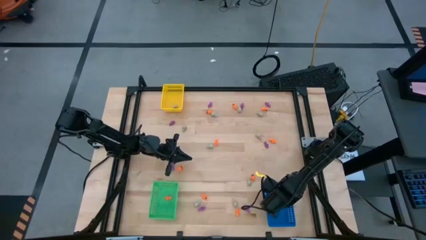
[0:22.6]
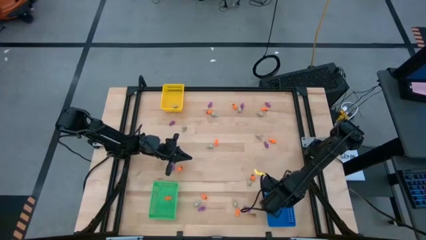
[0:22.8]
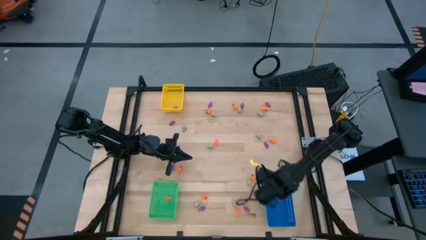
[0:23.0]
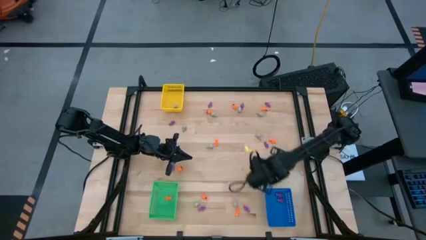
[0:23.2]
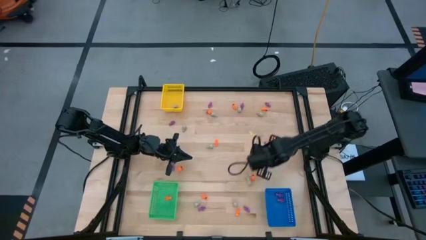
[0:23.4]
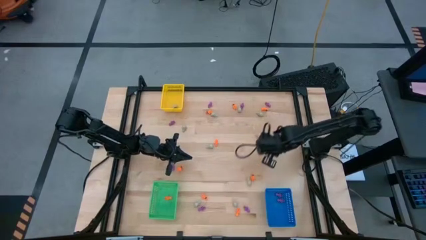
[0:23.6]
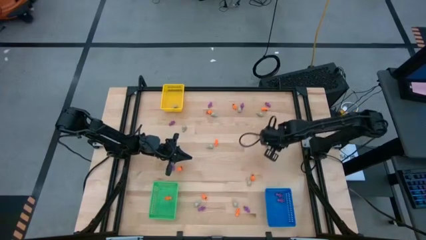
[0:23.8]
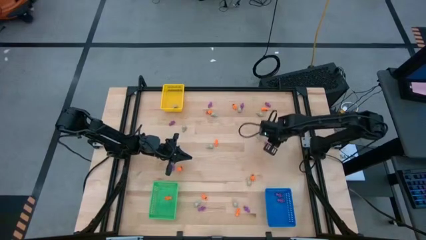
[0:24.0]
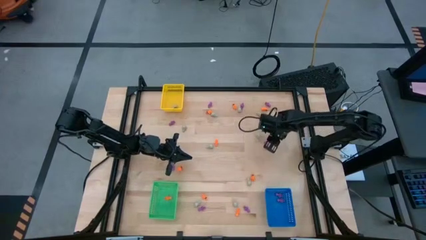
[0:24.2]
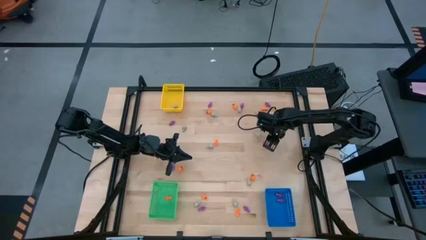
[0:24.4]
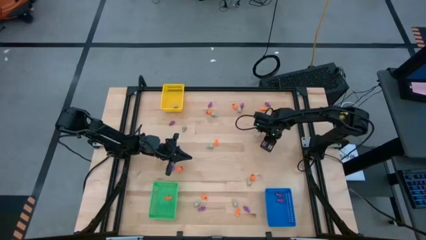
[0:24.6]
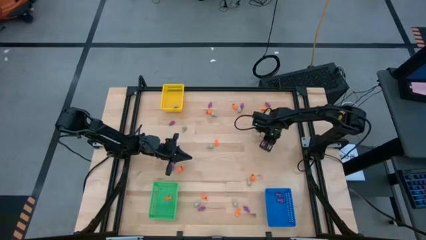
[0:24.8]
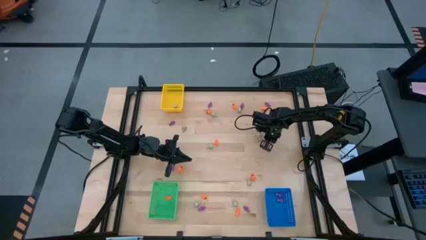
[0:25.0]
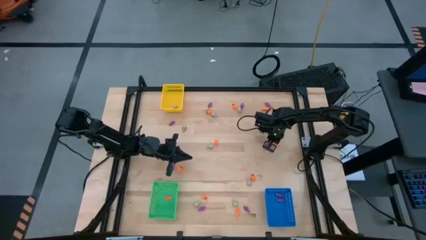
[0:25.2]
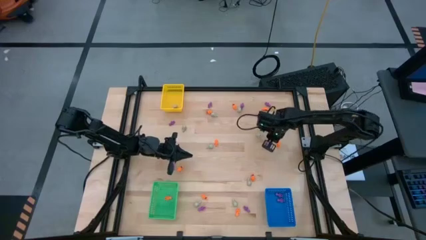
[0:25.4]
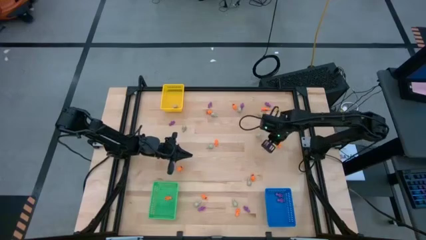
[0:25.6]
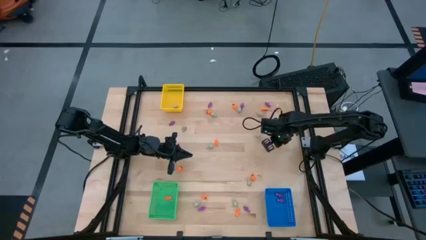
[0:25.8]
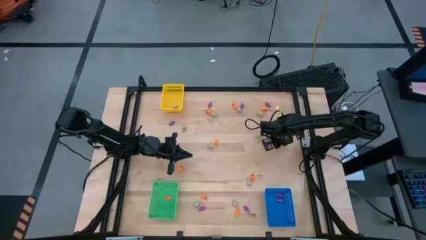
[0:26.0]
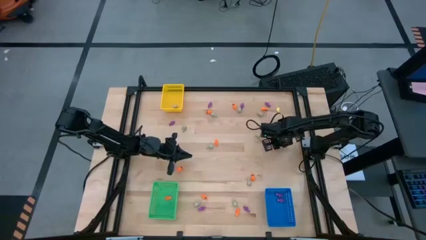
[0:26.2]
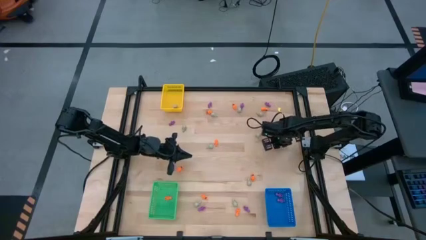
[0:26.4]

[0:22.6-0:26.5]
Task: Sort Halloween decoration
Put the orange skeleton toy into the green bin

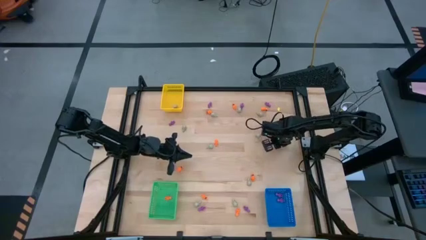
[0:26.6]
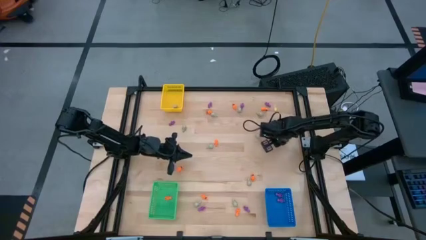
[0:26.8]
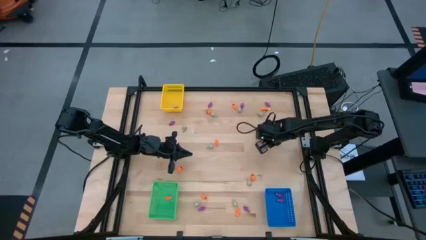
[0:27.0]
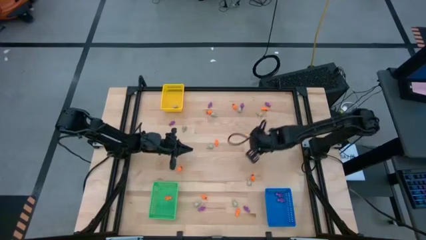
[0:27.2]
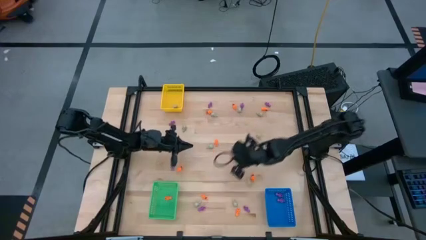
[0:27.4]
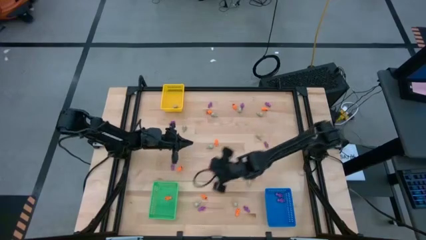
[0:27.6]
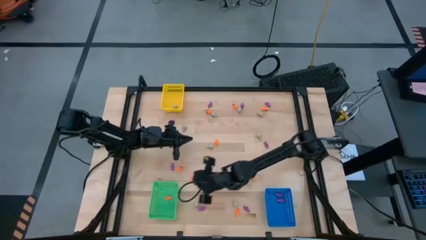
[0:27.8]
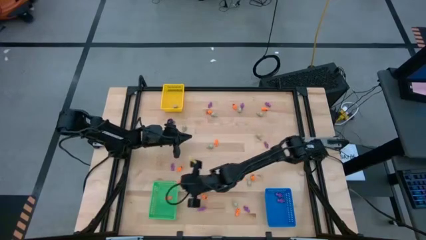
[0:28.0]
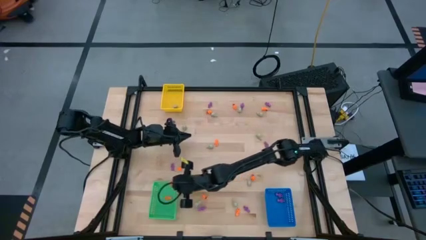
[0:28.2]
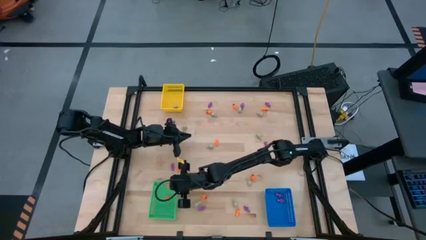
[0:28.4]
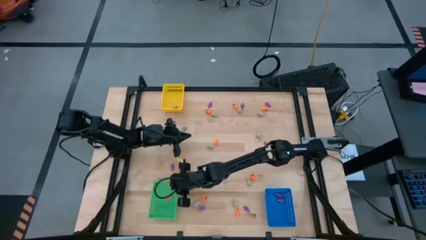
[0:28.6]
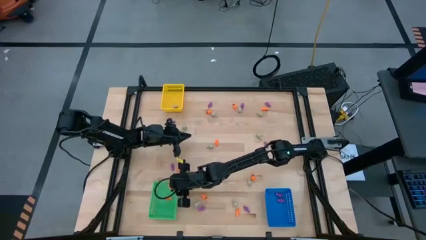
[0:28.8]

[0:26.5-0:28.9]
Put the orange skeleton toy into the green bin

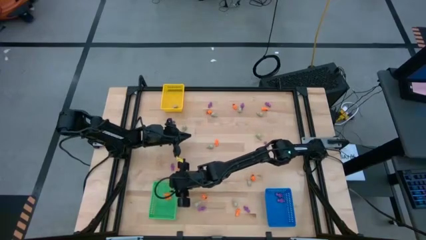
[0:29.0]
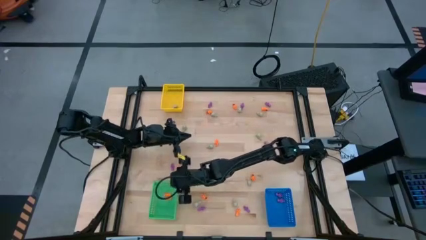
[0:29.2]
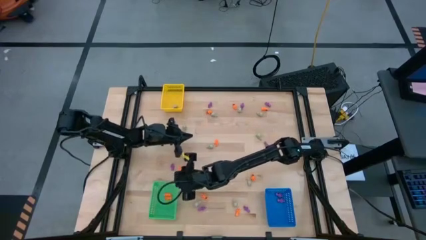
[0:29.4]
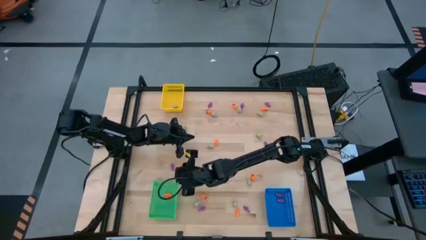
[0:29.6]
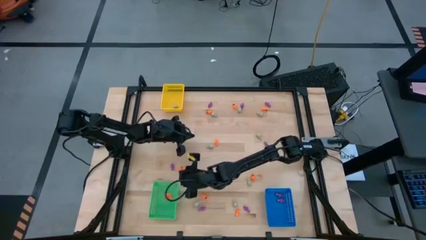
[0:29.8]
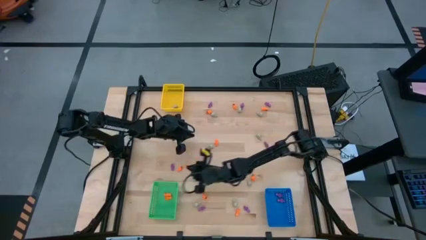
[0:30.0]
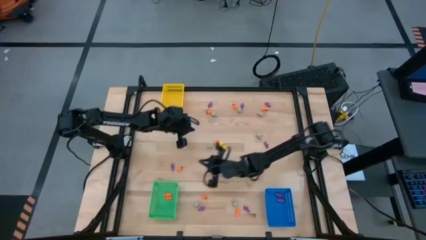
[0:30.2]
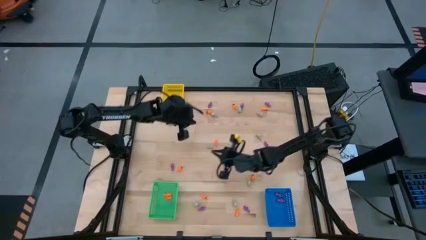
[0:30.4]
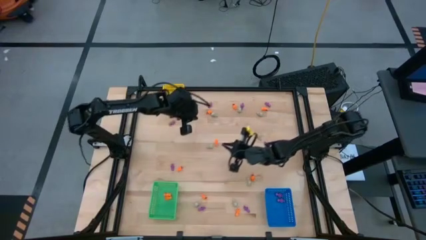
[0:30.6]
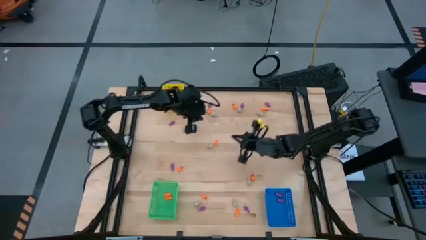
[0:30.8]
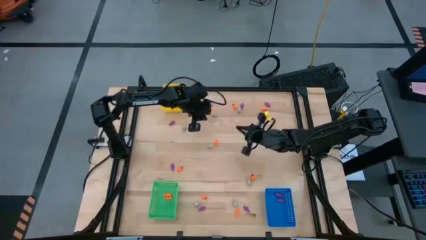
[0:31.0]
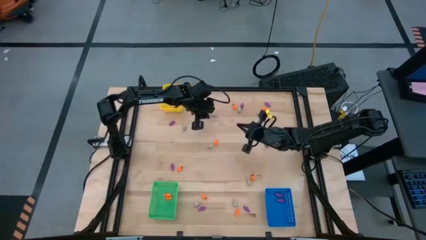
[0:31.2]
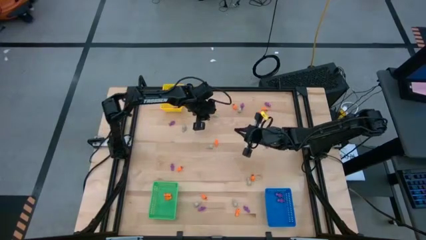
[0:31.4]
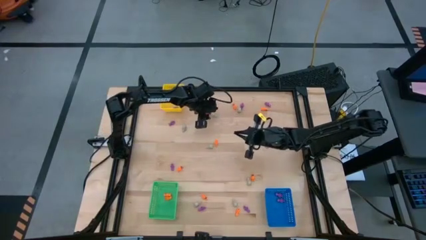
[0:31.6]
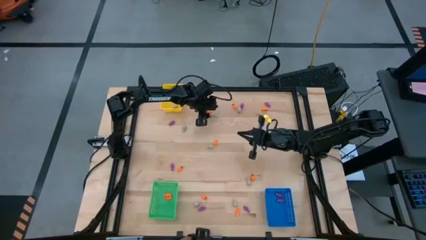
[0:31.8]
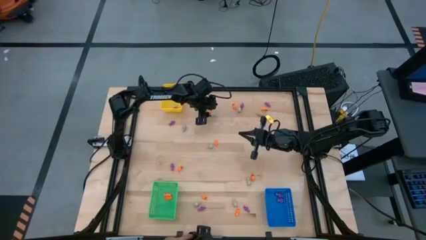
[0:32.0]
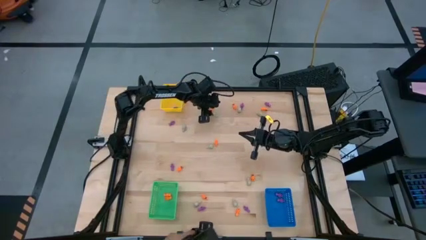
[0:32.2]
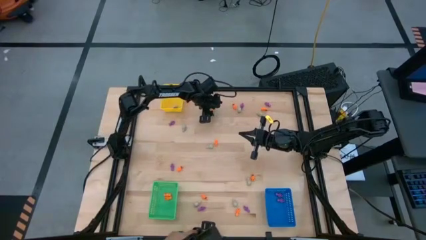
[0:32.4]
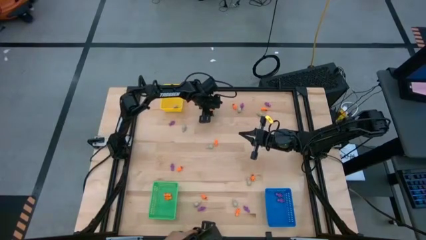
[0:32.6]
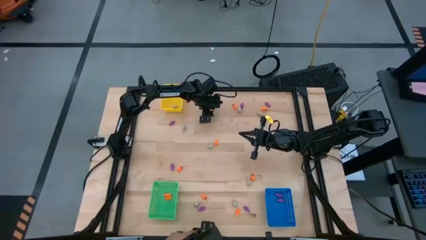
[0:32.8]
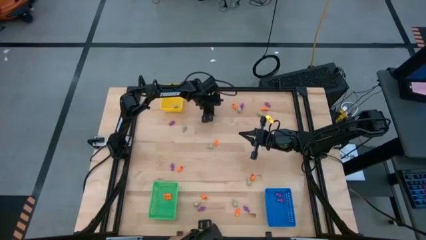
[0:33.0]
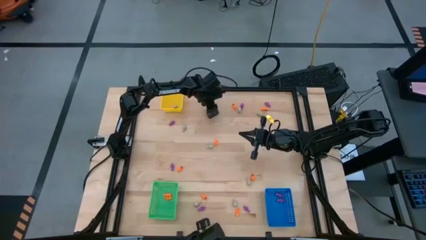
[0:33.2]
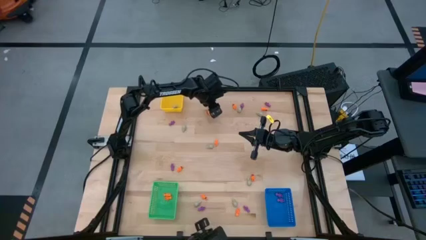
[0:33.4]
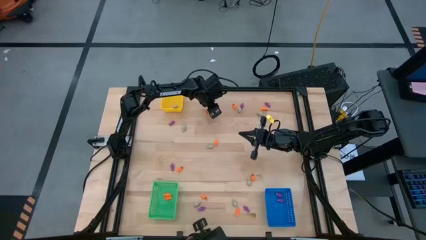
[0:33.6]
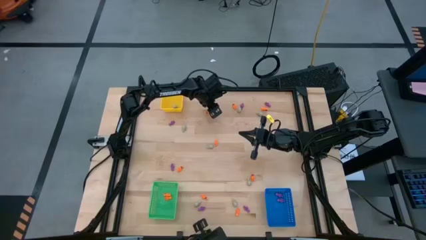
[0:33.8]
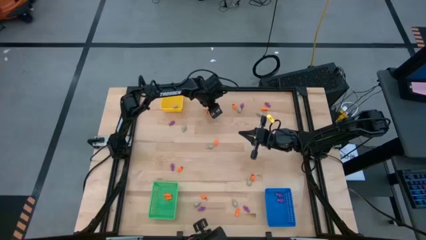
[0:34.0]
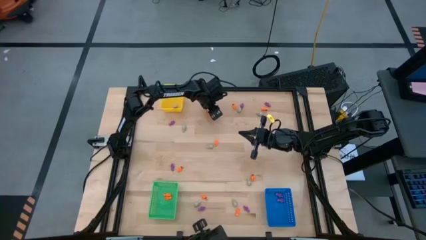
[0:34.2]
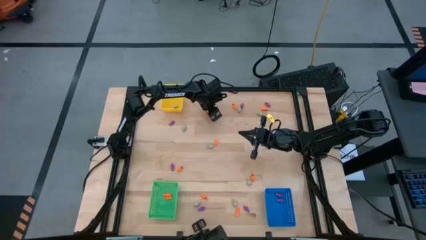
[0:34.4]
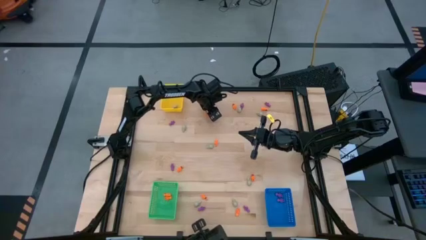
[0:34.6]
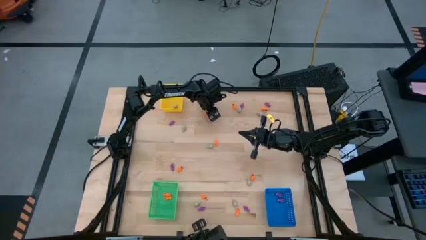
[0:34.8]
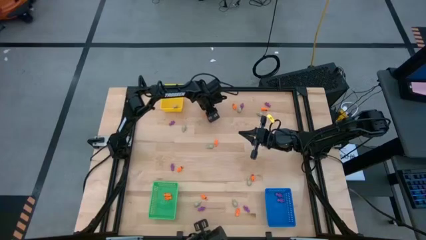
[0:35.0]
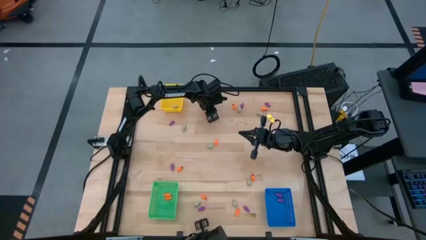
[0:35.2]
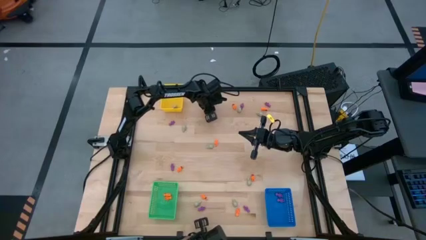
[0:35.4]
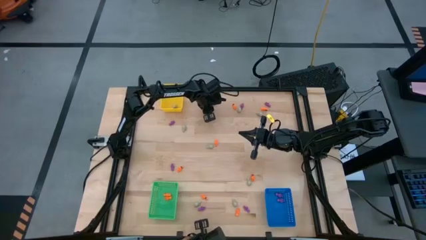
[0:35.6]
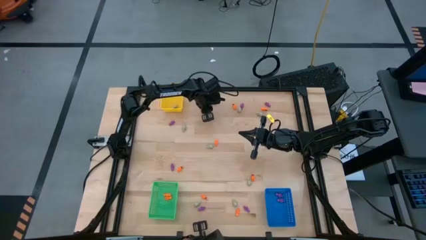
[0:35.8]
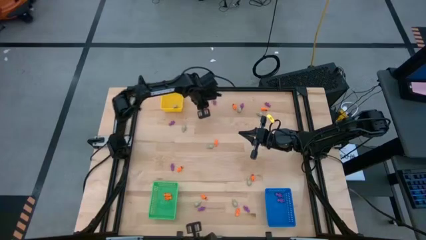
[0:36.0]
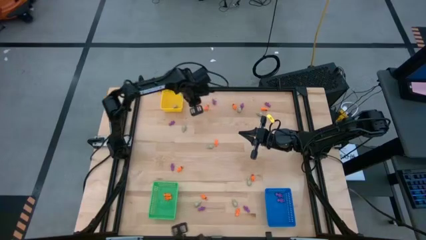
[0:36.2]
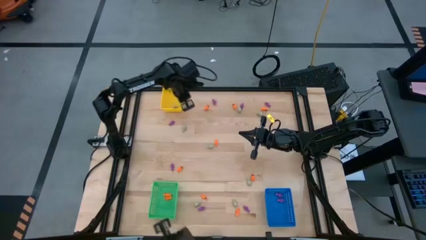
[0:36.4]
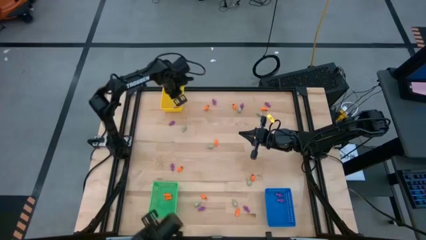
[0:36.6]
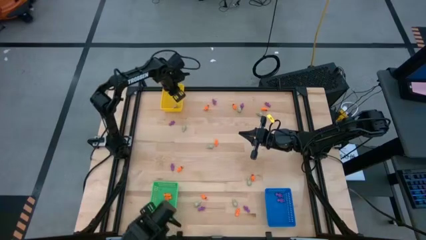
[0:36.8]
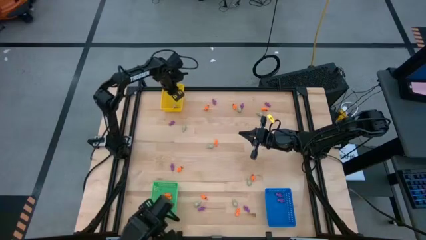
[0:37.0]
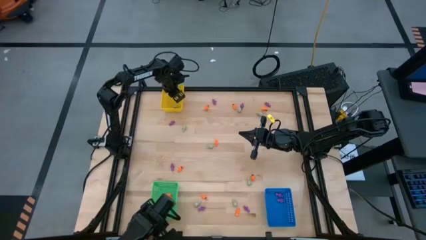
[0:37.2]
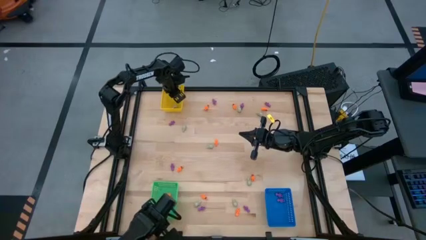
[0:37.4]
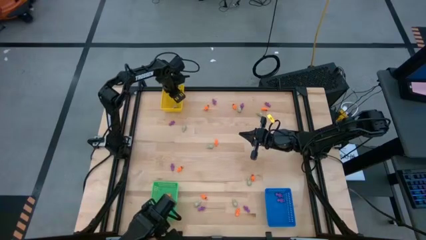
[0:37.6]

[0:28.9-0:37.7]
Put the gray skull toy into the yellow bin
